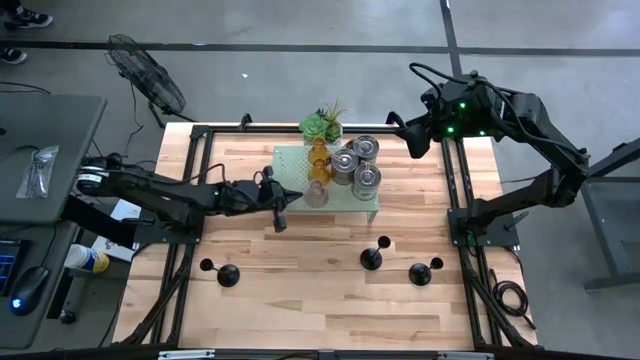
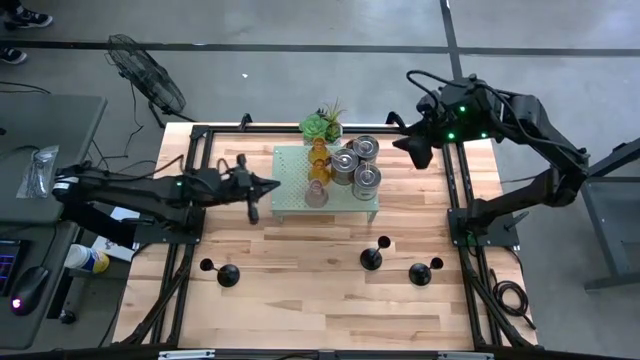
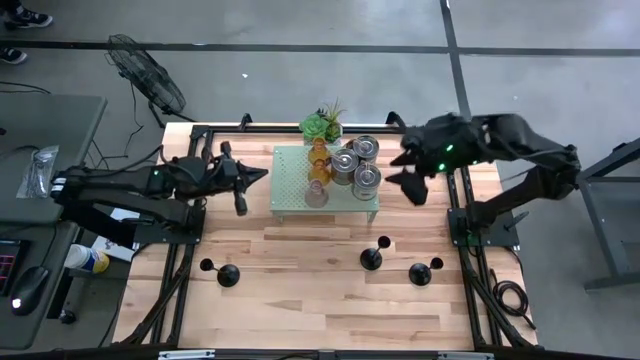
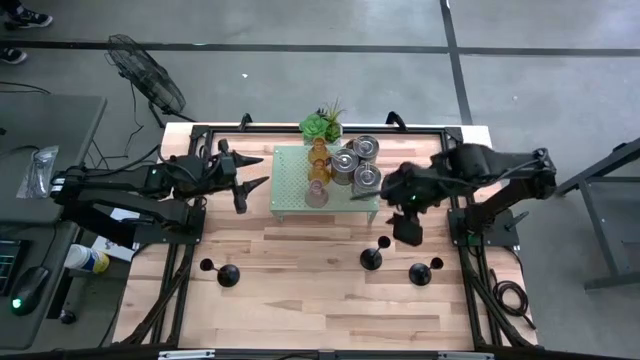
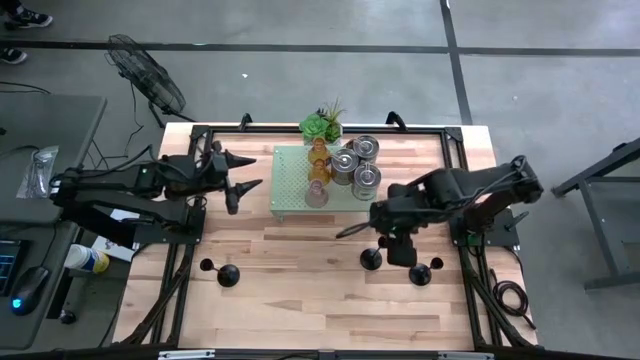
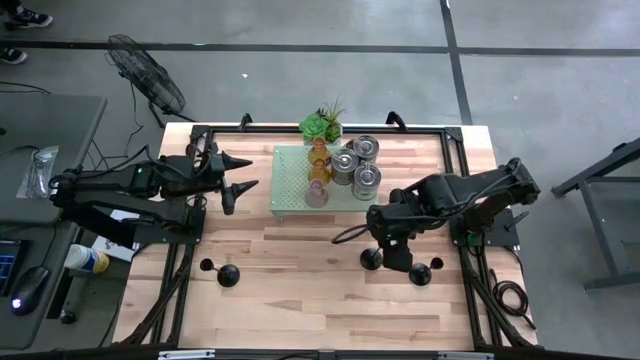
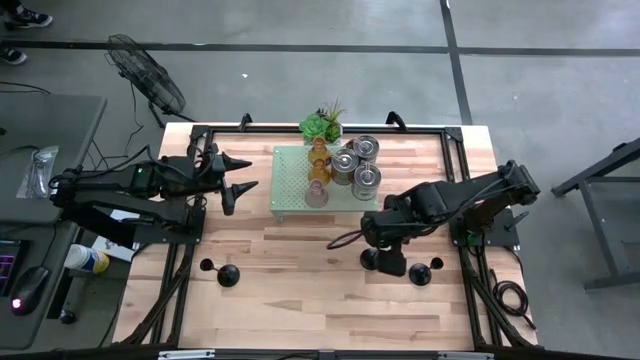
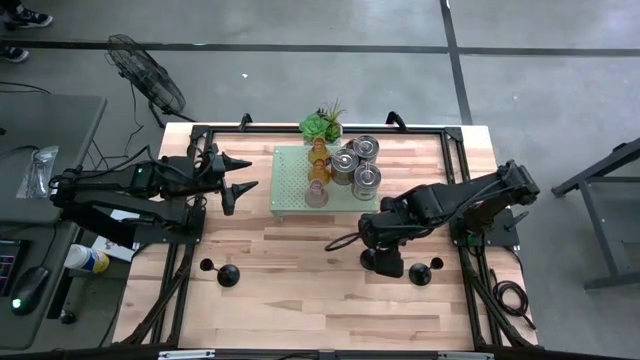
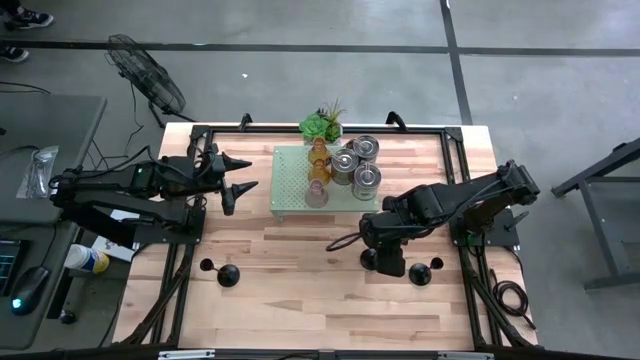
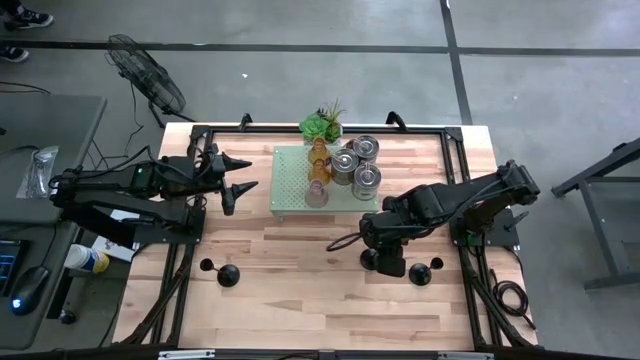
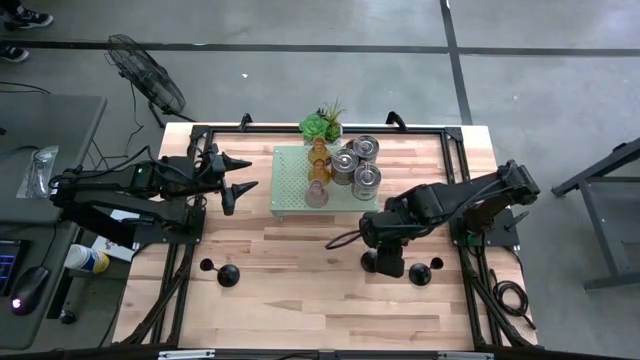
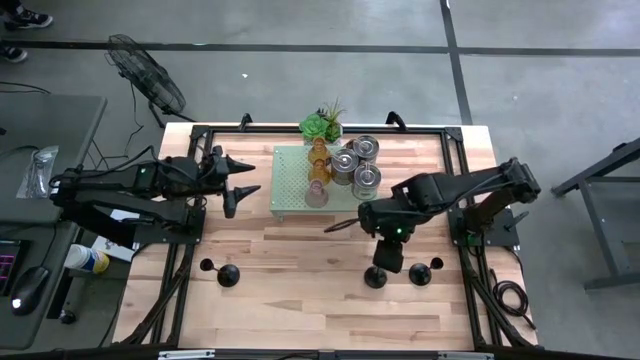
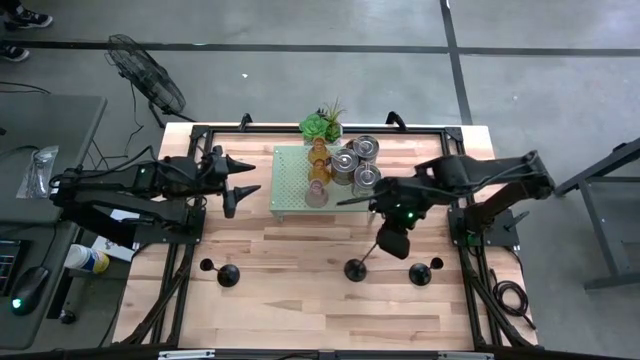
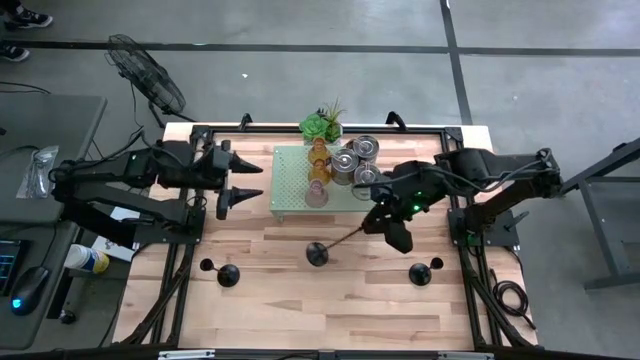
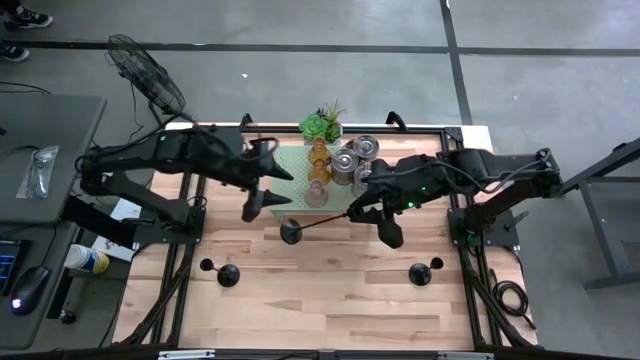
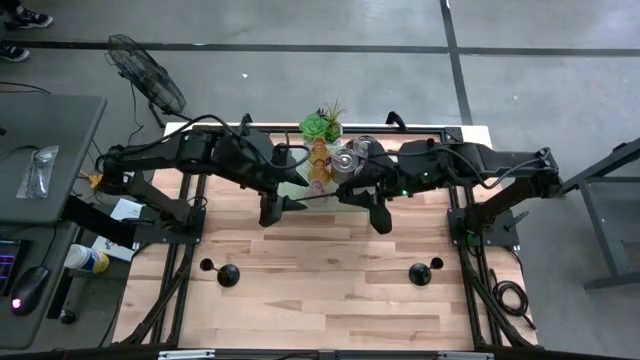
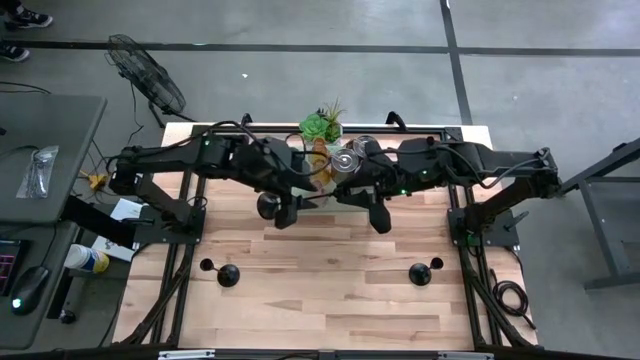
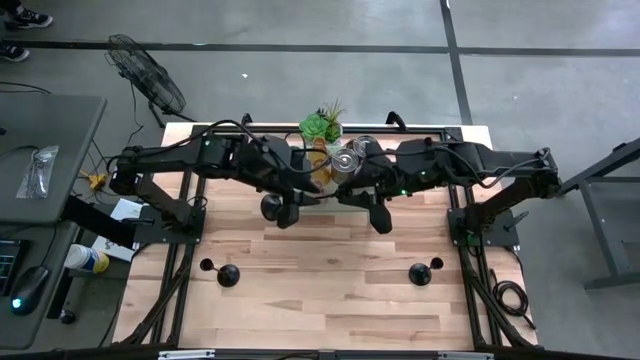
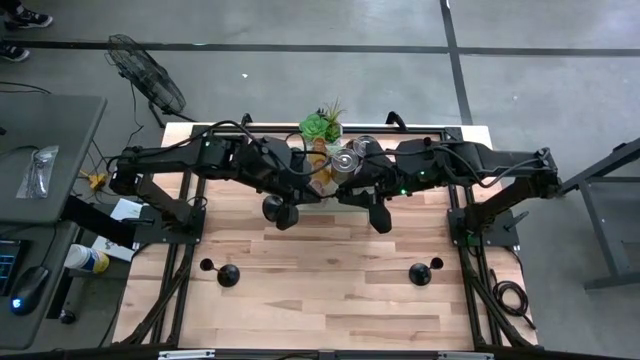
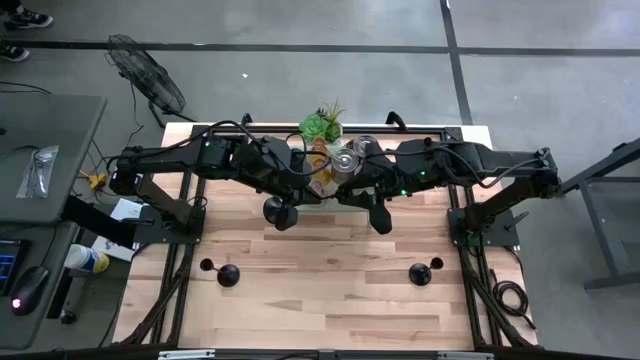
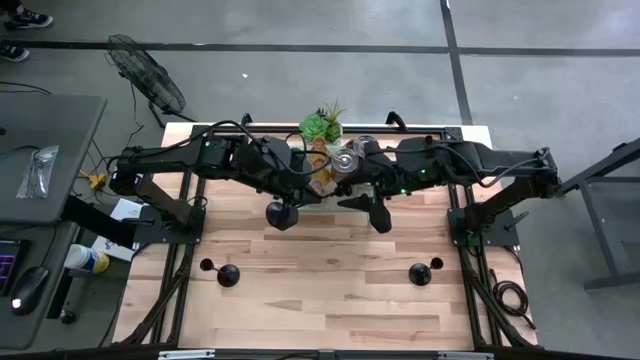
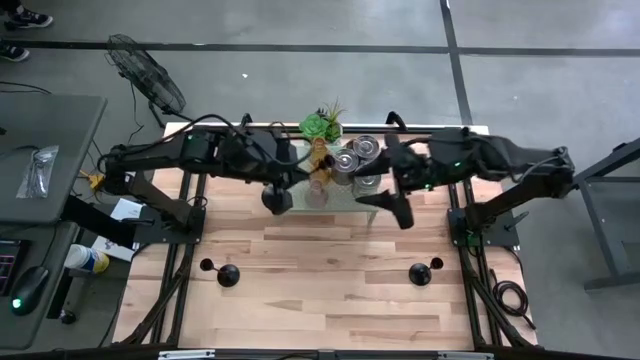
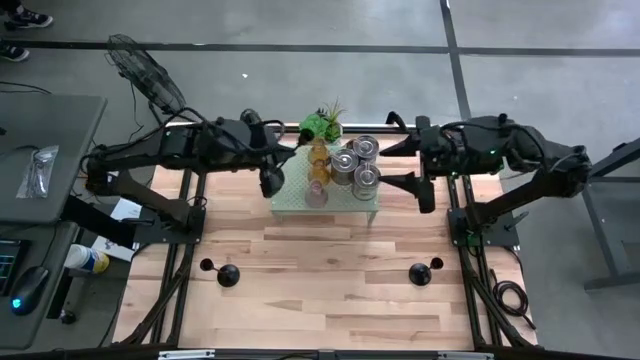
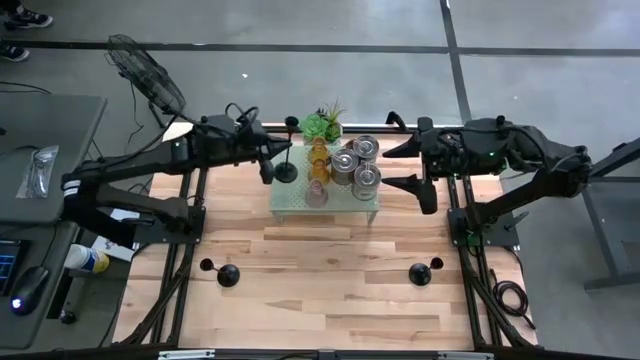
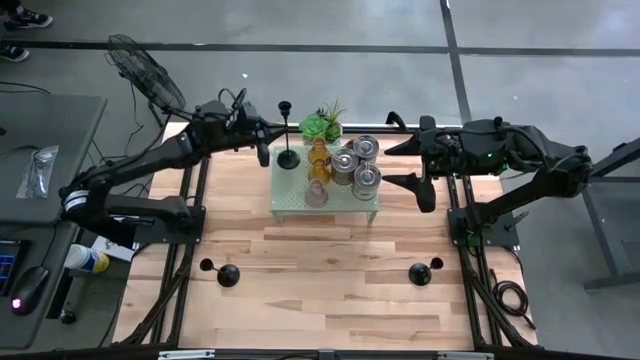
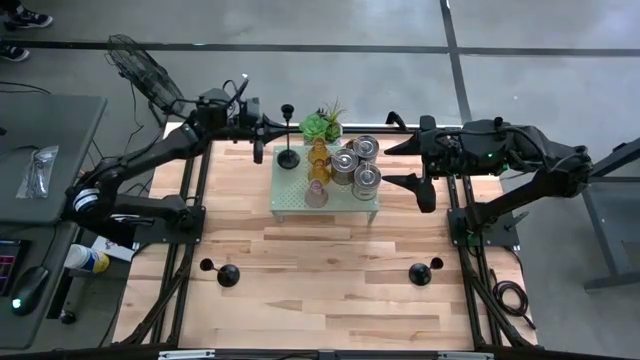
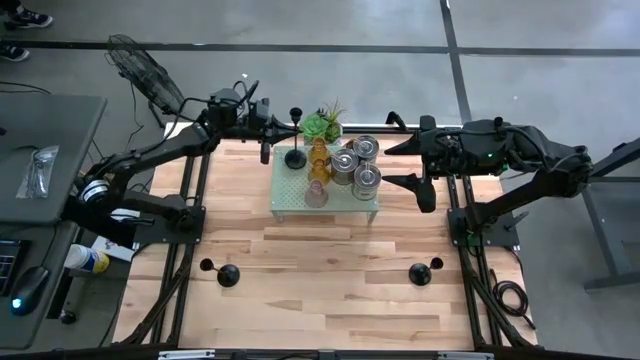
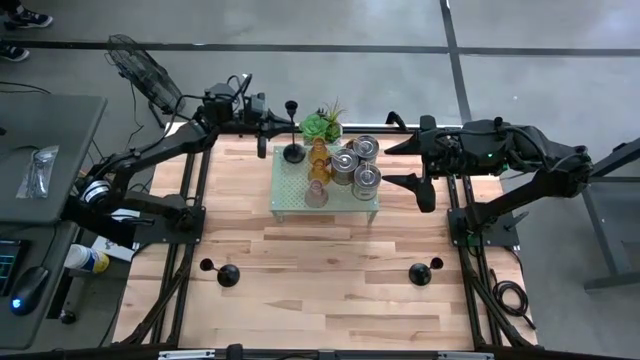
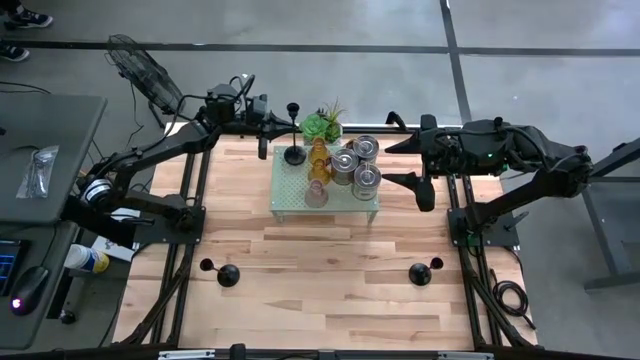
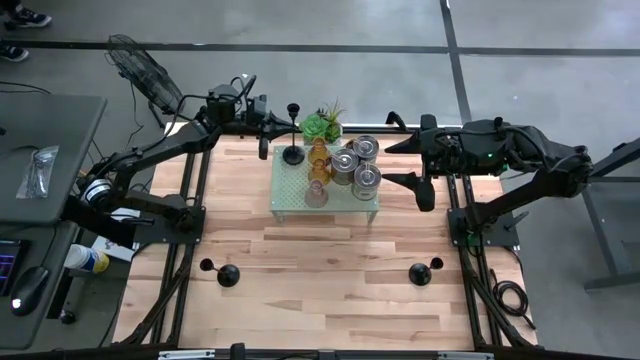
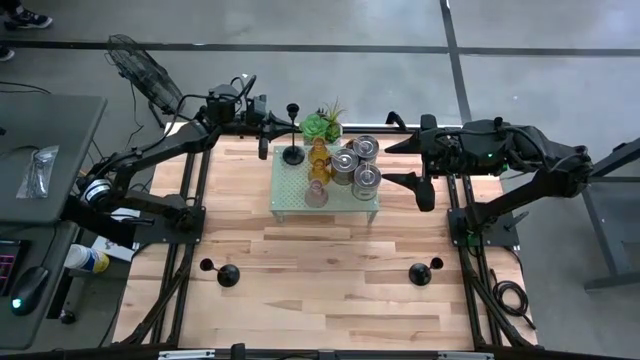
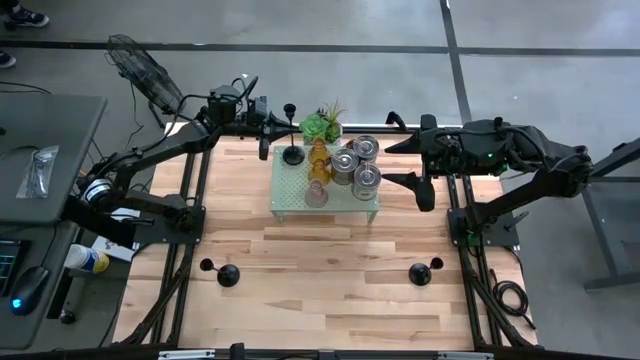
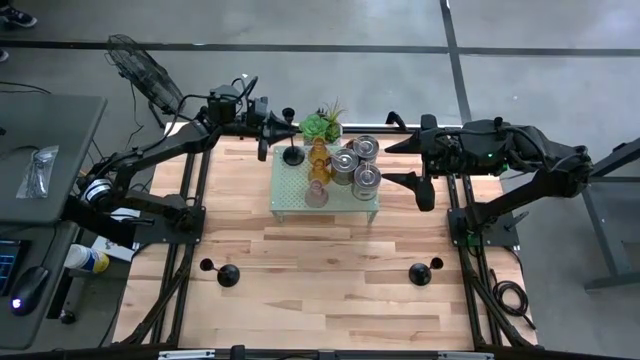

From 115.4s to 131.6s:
Task: Pick & Place candle stick holders
Put the middle black candle holder on the shelf

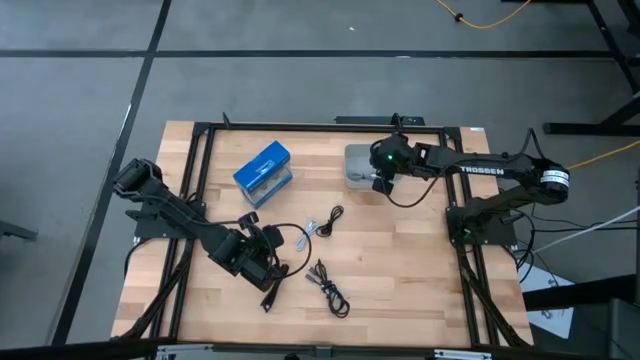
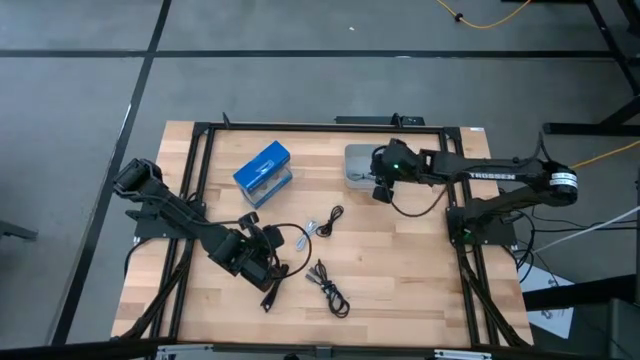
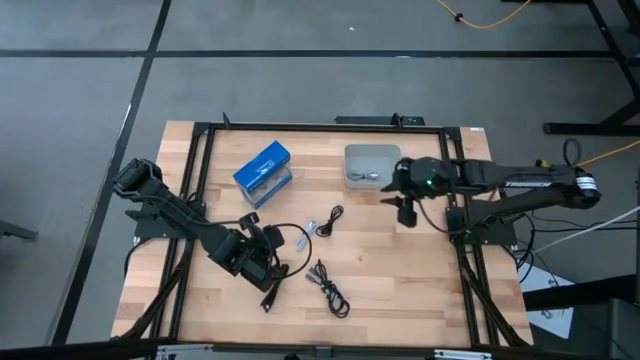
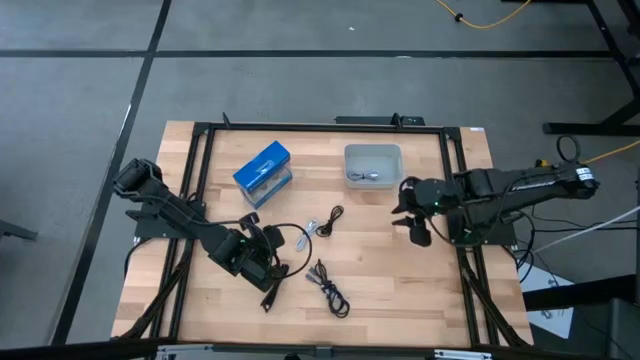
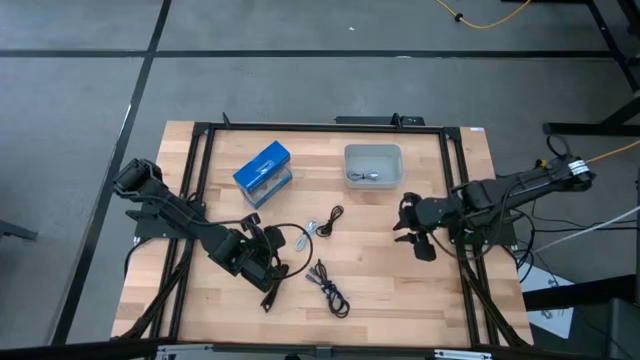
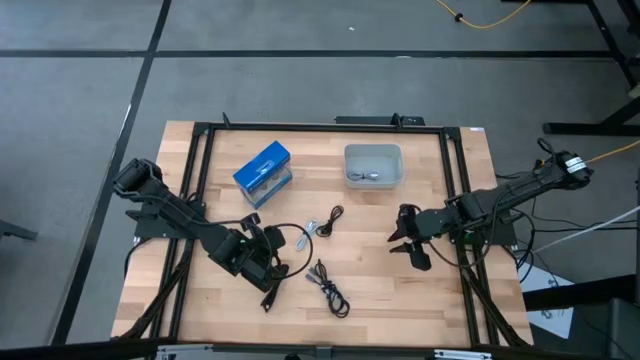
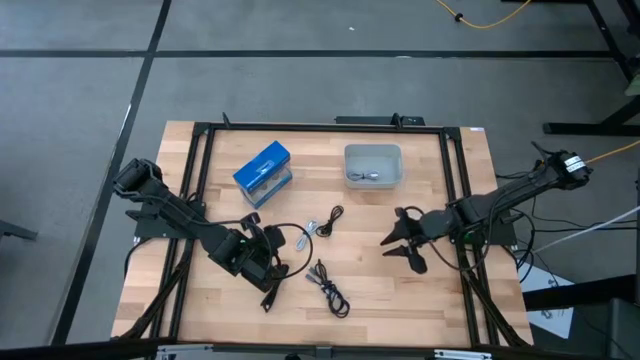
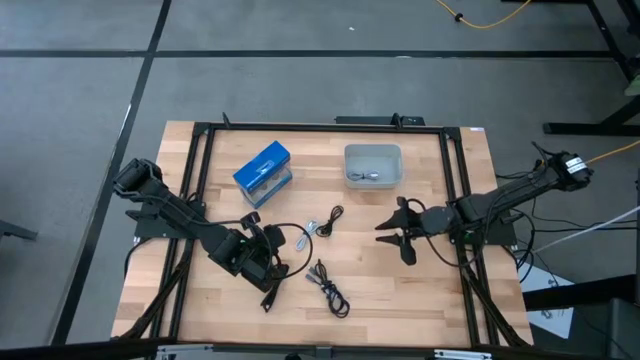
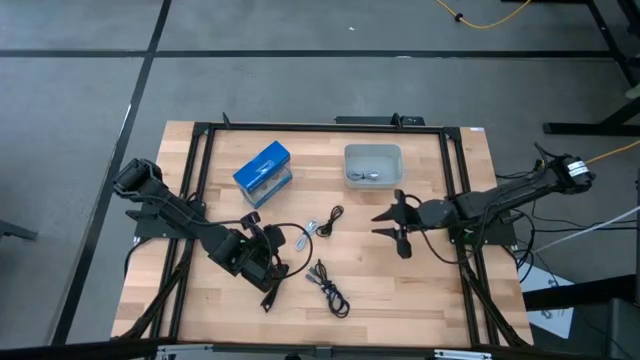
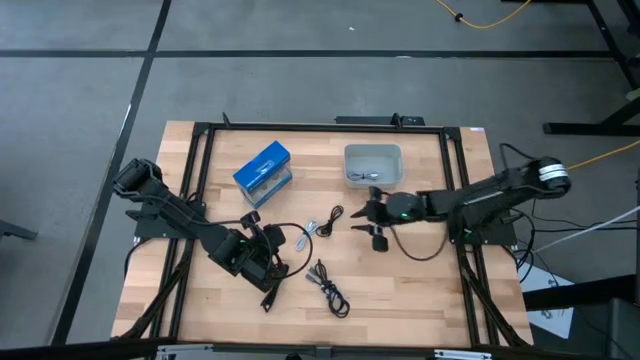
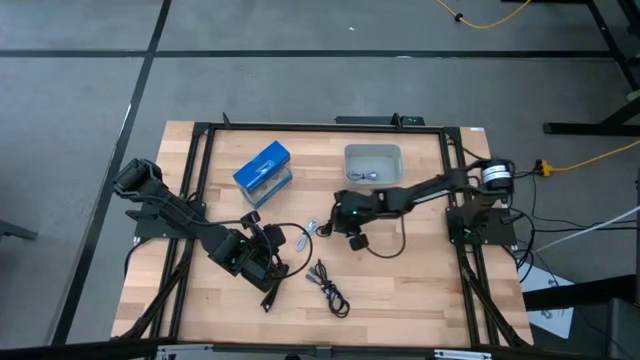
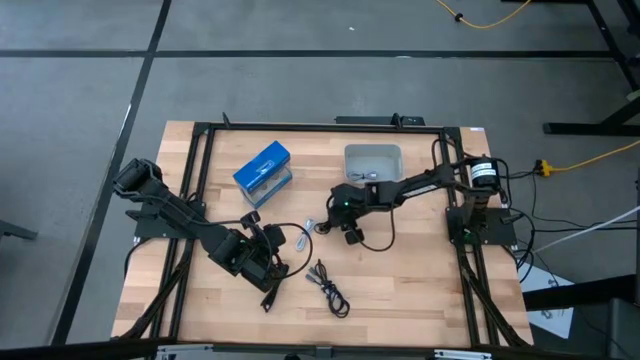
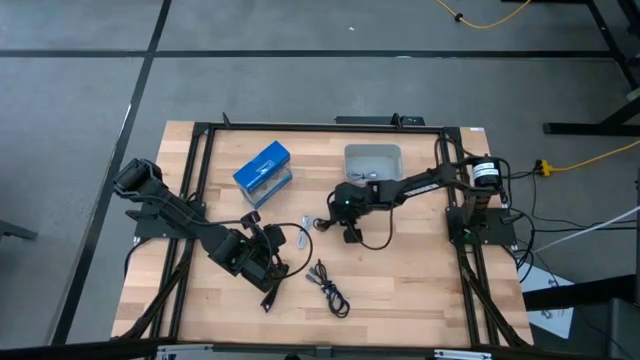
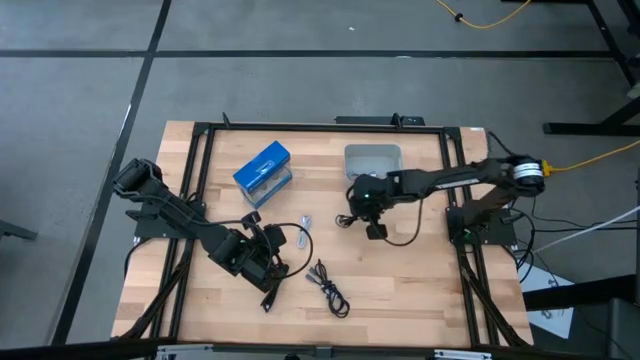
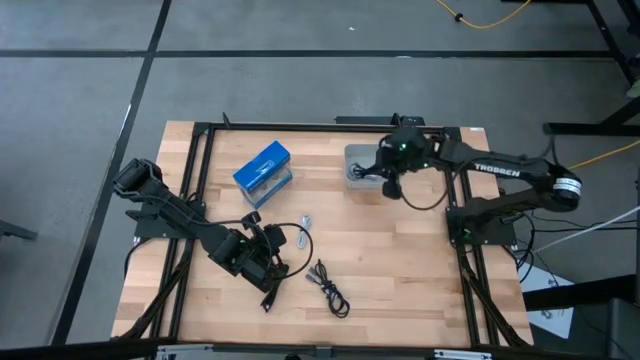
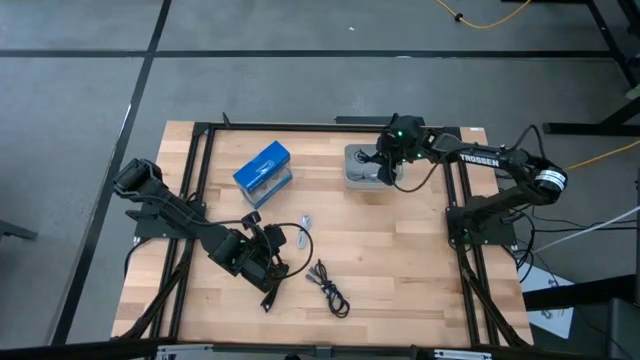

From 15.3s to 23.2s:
Task: Pick and place USB-C Cables
Put the top black charger cable into the gray bin
